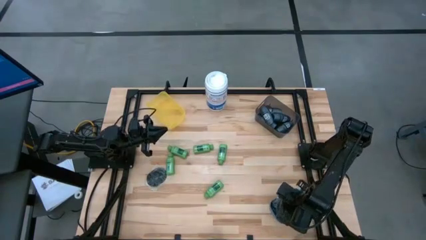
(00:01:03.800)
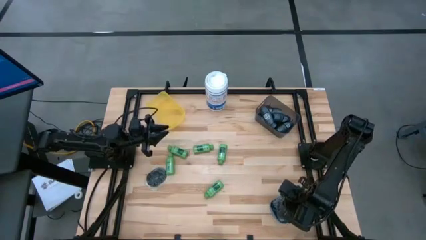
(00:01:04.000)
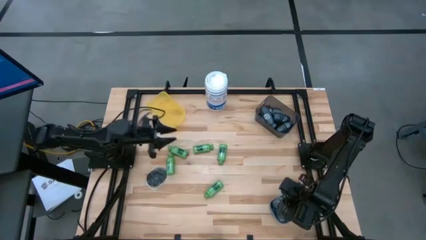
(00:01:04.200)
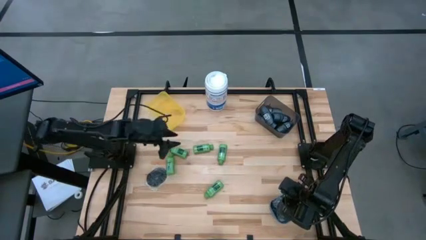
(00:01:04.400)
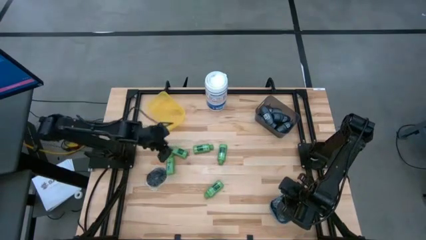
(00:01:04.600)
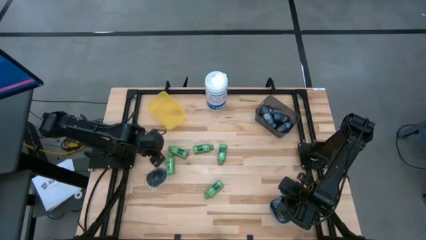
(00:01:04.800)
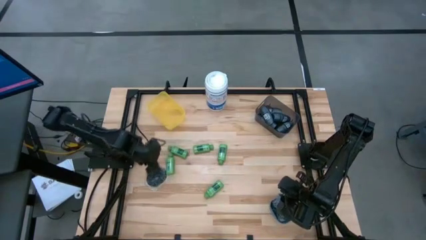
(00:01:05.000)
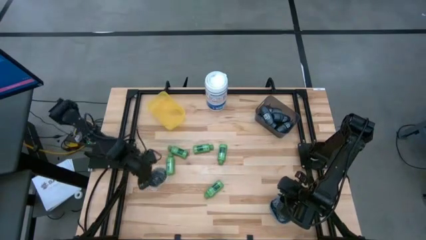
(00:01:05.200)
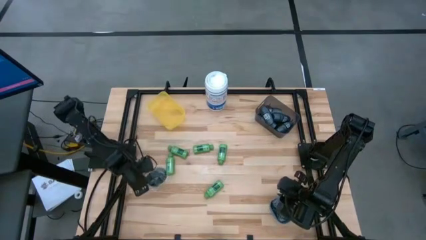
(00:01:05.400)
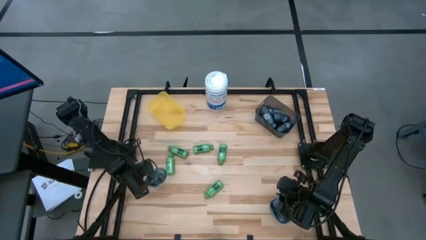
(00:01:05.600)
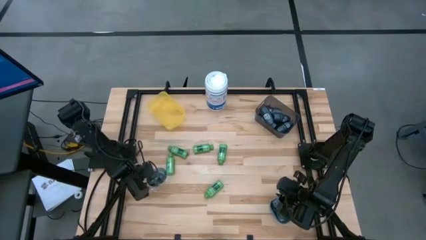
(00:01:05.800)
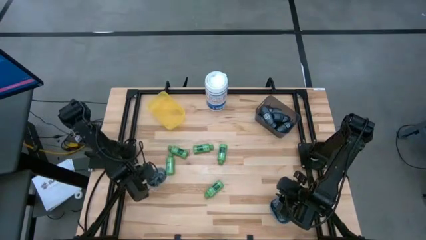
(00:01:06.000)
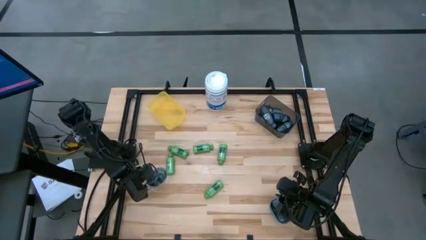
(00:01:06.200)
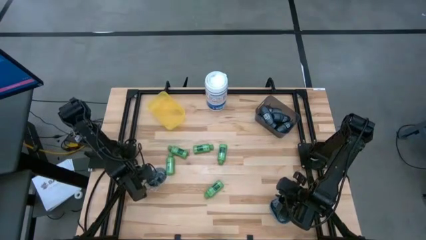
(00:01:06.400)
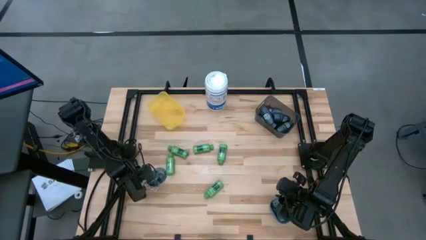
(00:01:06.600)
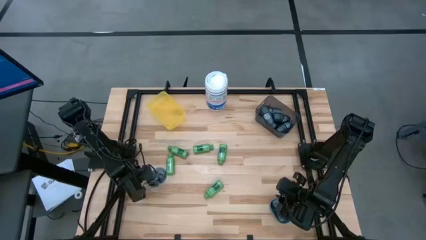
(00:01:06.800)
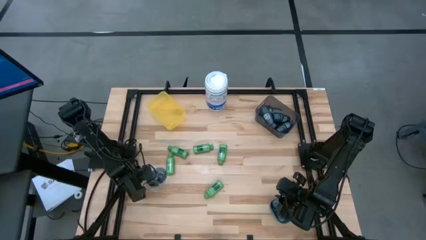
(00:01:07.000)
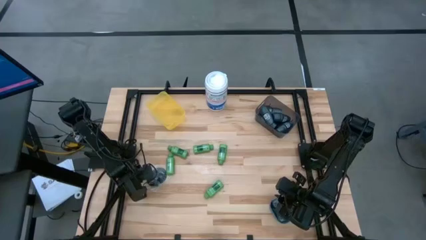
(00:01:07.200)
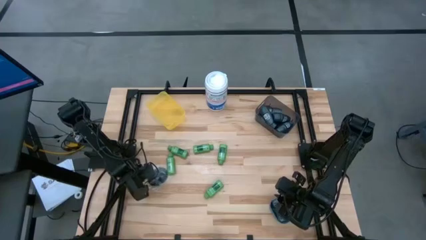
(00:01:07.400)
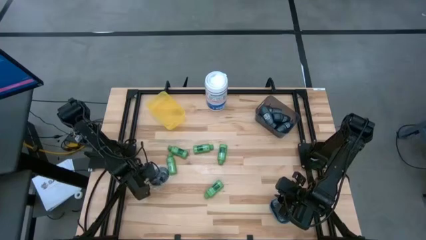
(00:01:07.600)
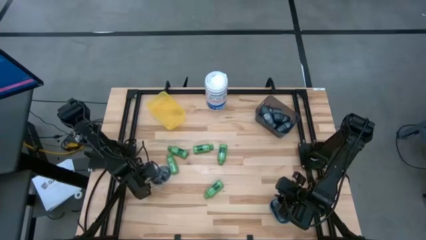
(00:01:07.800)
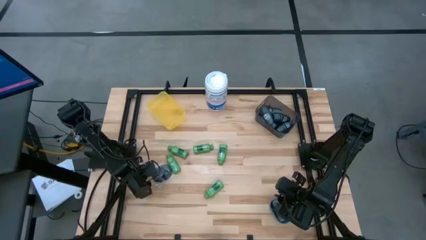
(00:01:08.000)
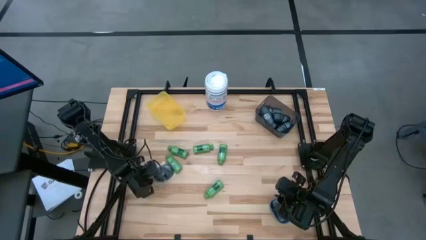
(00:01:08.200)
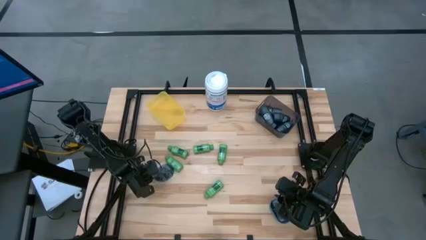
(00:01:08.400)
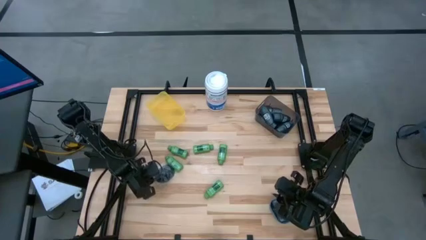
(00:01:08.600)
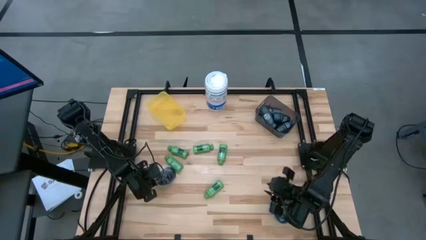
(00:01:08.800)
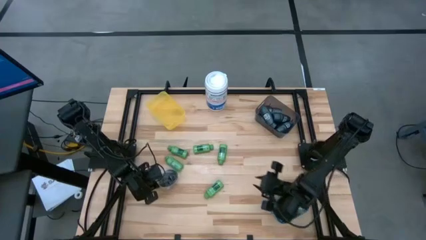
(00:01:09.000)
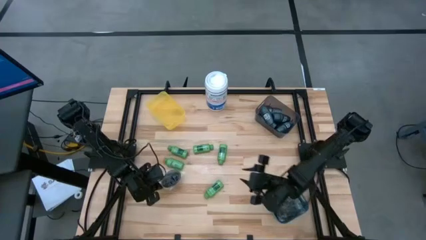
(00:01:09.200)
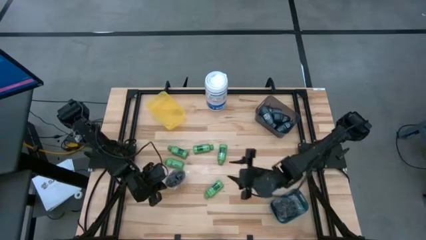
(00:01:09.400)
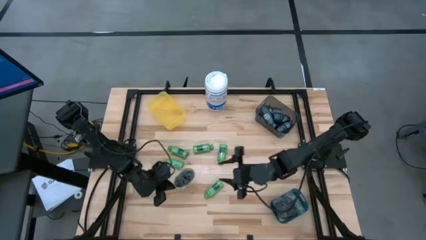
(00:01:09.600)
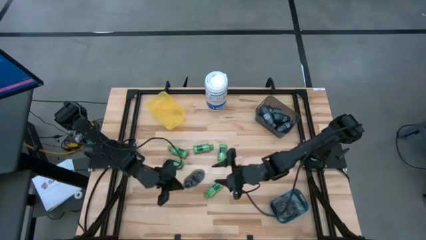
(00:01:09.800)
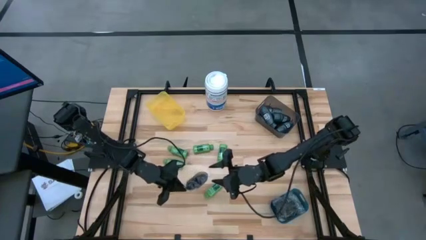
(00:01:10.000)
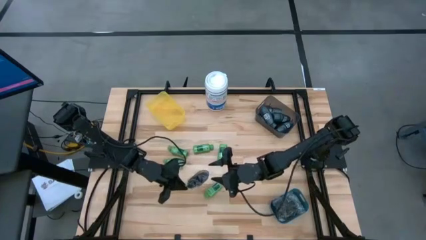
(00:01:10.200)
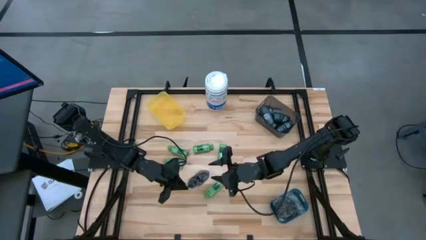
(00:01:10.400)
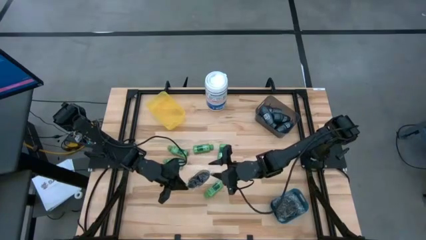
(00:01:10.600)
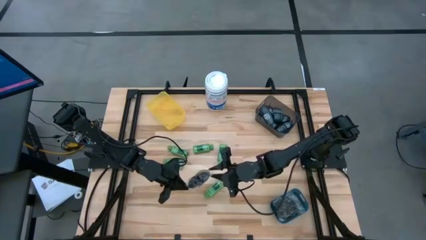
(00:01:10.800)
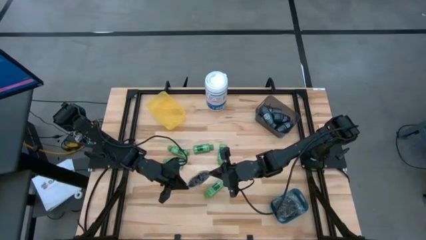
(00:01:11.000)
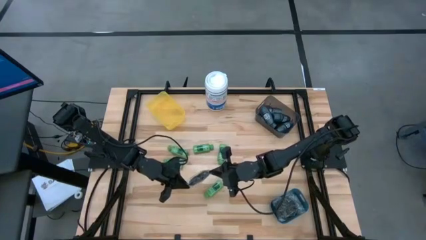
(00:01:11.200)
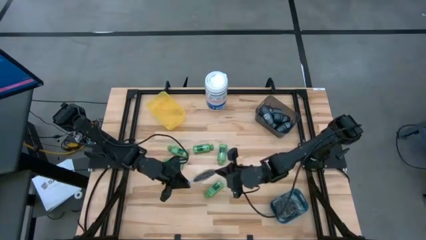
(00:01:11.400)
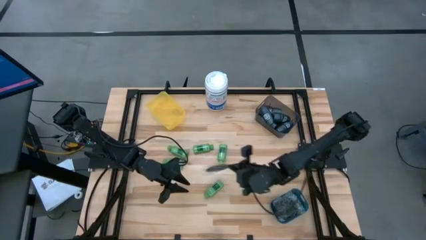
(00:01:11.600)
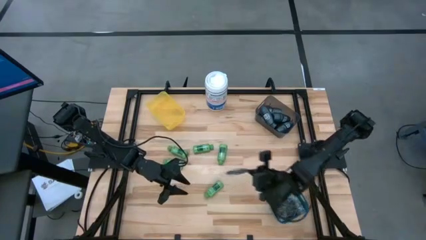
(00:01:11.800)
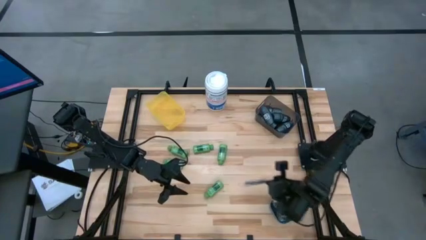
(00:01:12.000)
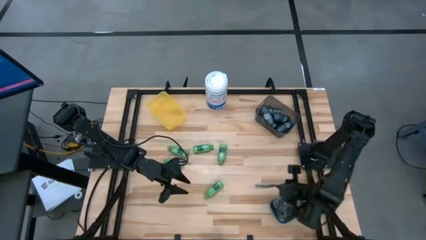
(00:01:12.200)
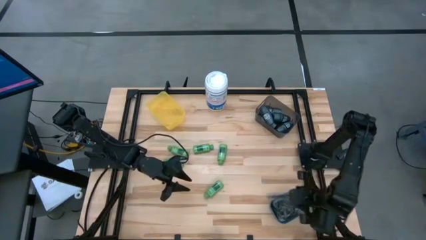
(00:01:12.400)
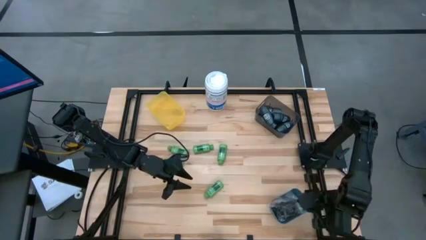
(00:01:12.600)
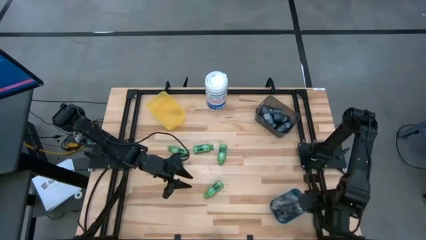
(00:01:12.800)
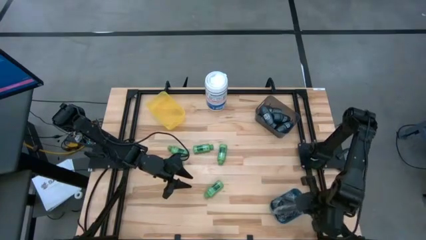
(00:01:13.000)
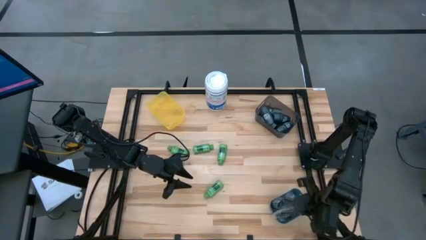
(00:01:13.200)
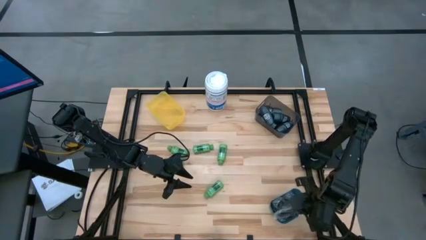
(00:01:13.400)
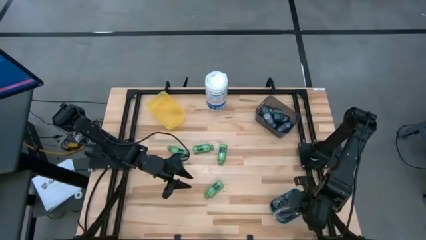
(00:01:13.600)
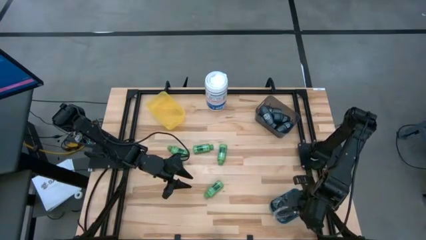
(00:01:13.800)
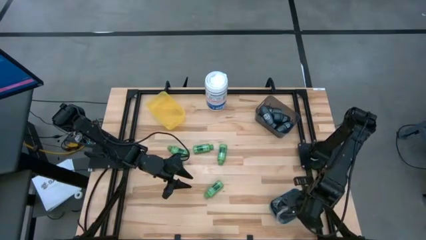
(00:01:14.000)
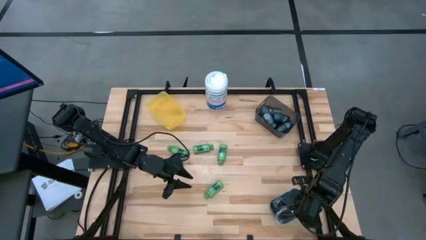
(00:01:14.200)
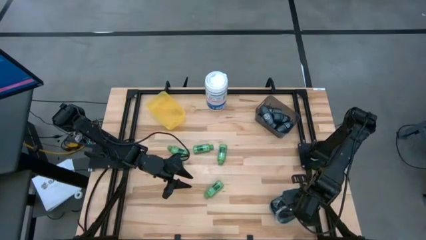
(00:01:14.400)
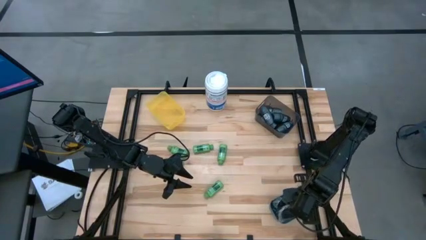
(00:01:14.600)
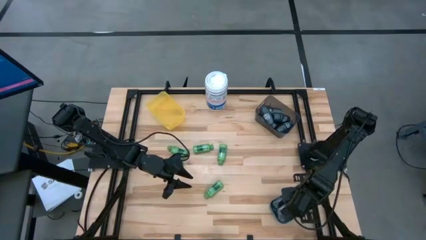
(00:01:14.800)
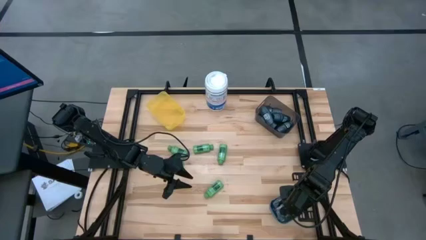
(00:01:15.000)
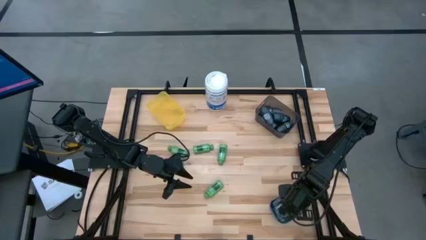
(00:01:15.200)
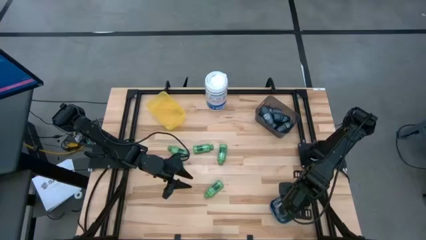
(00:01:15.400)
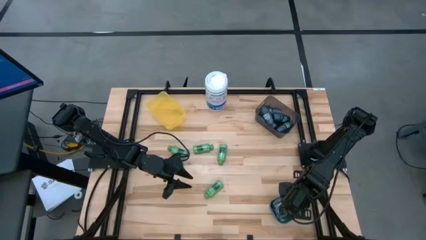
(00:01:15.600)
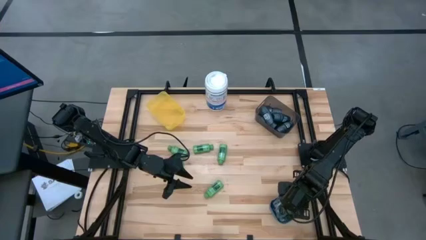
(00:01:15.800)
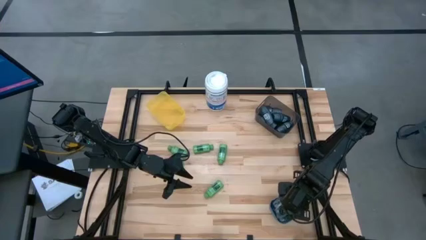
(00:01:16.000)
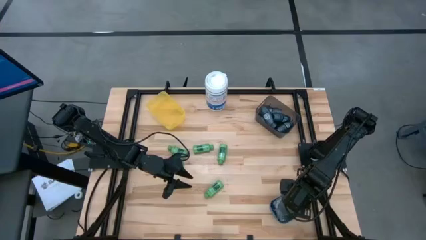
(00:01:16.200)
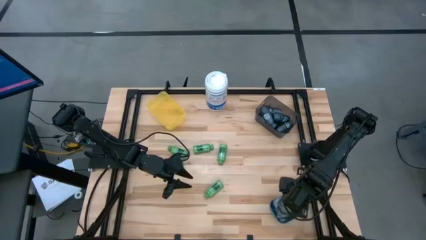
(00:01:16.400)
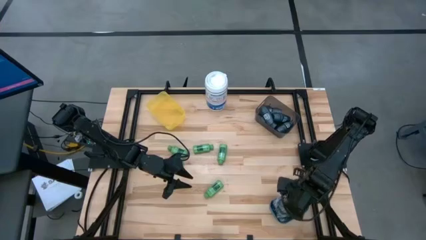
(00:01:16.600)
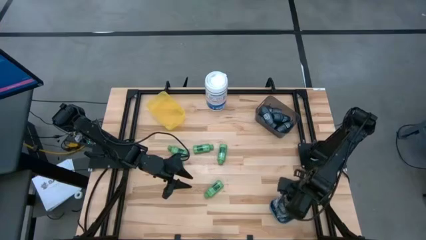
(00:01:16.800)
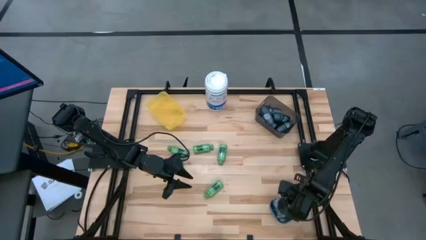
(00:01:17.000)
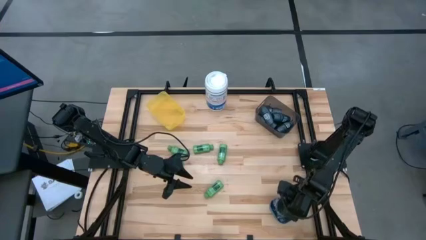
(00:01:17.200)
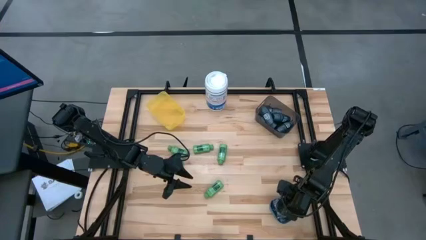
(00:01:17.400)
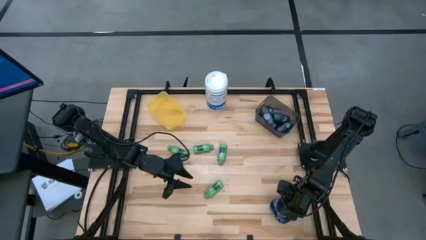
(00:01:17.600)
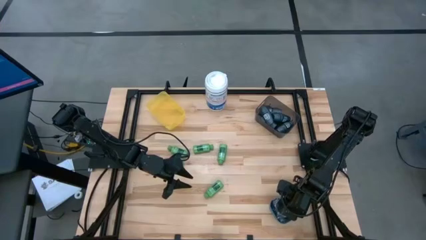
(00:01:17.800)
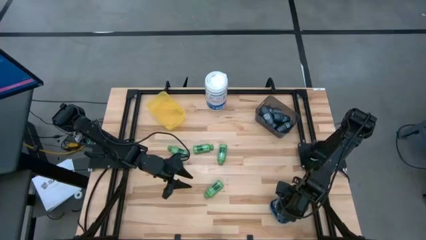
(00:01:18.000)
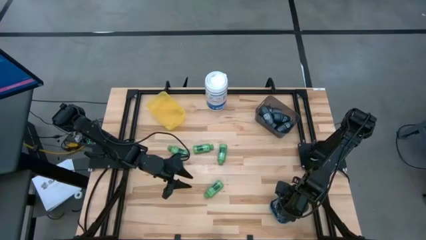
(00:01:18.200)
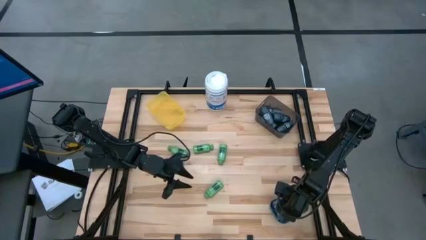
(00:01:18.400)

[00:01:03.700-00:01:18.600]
Task: Pick & Place Travel size toiletries
Put the black hairbrush into the blue bin

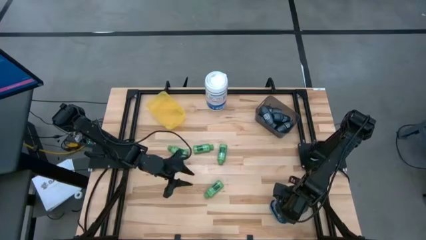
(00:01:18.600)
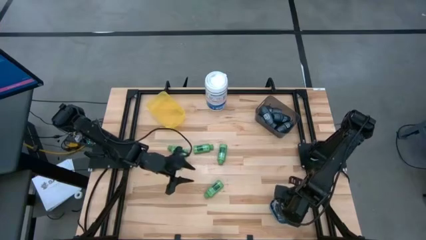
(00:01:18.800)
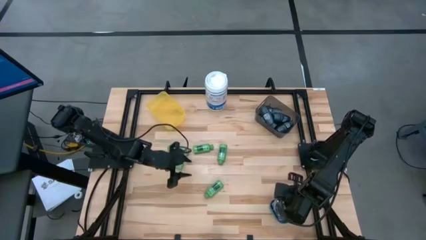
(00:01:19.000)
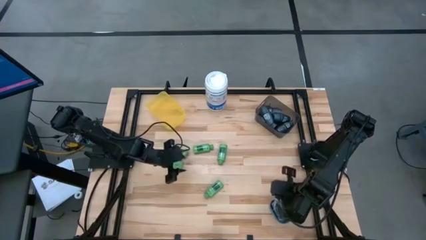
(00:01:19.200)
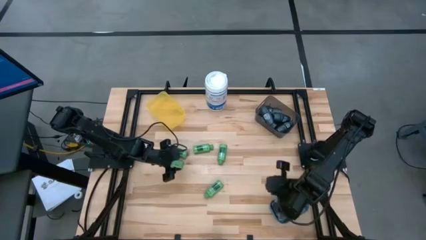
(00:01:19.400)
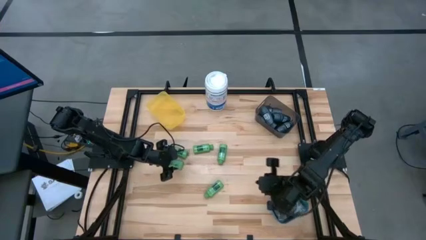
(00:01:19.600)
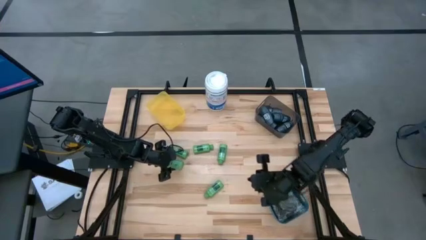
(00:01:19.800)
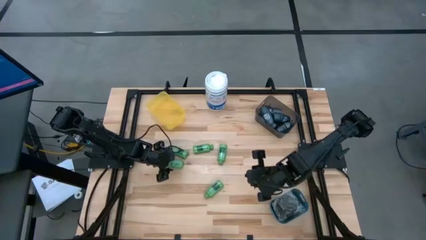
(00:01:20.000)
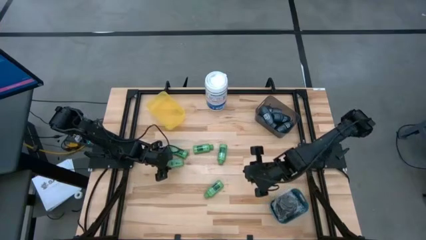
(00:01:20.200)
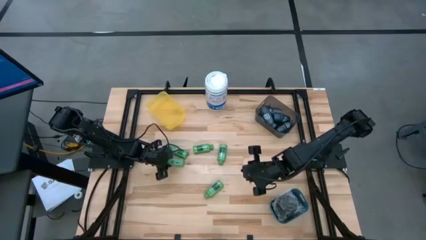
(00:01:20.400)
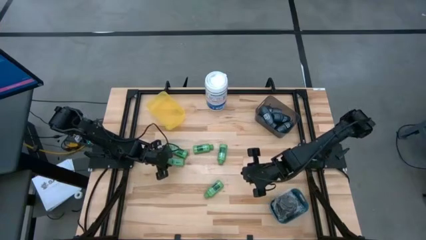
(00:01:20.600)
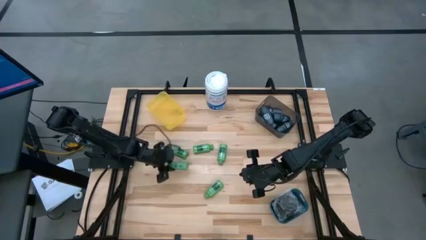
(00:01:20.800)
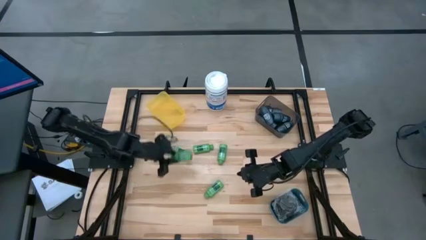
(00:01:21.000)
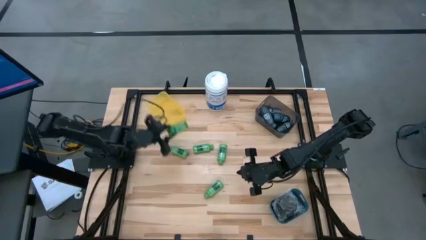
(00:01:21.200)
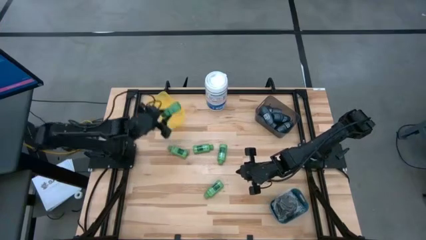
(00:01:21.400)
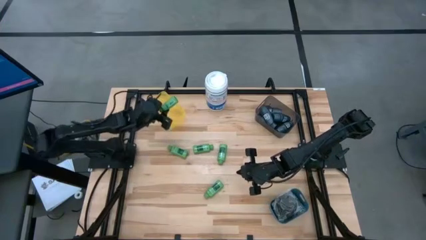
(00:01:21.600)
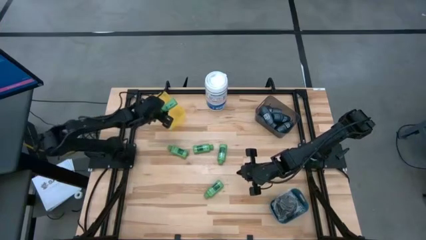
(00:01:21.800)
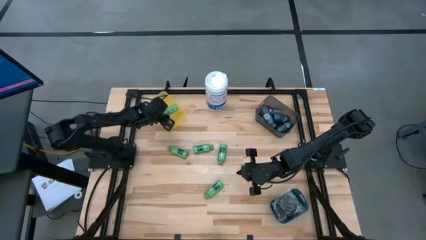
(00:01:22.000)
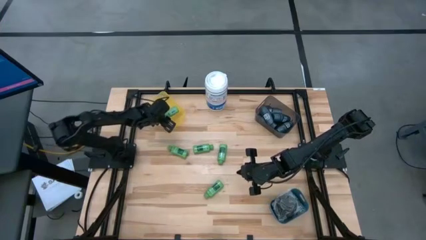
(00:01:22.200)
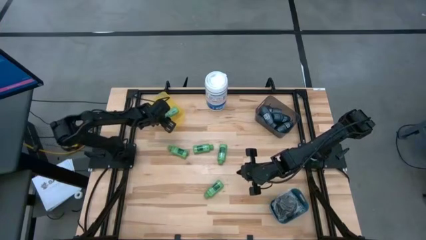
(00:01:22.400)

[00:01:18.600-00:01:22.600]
Put the green shampoo into the yellow bin
